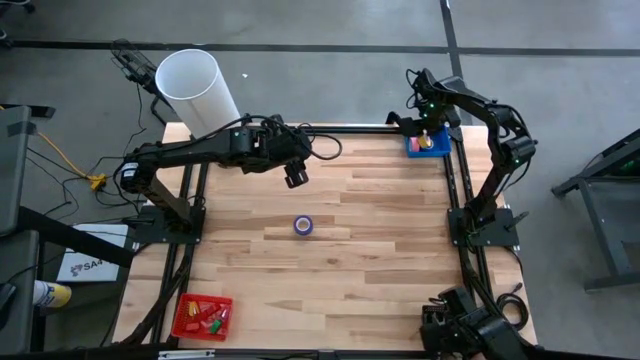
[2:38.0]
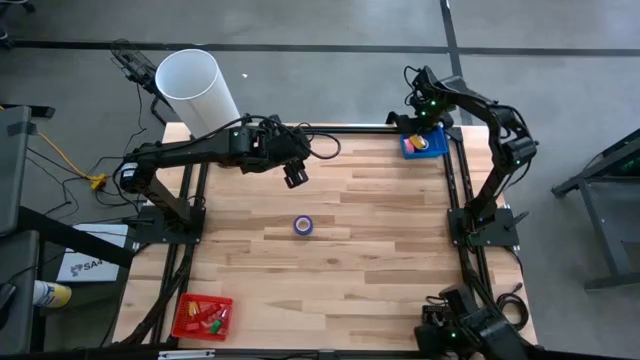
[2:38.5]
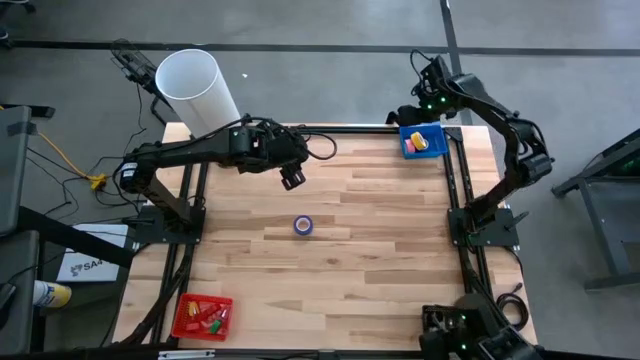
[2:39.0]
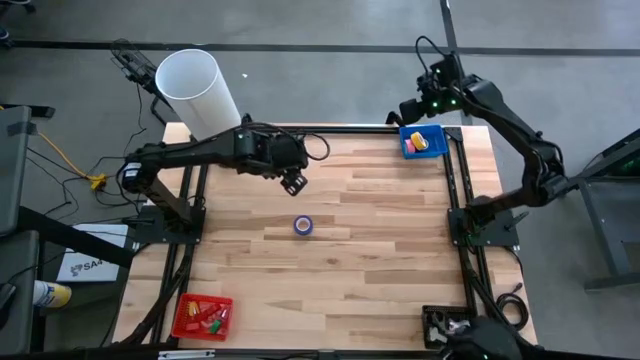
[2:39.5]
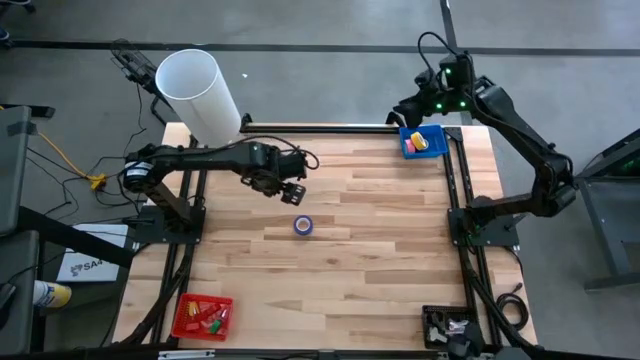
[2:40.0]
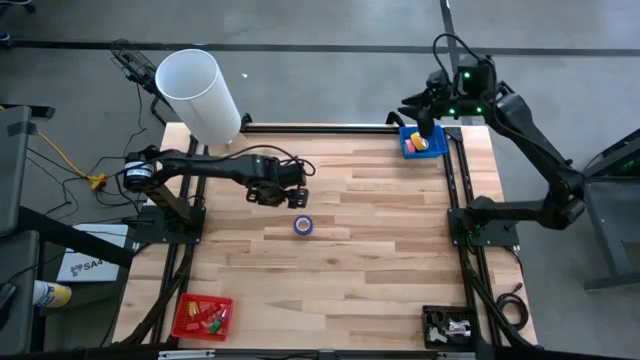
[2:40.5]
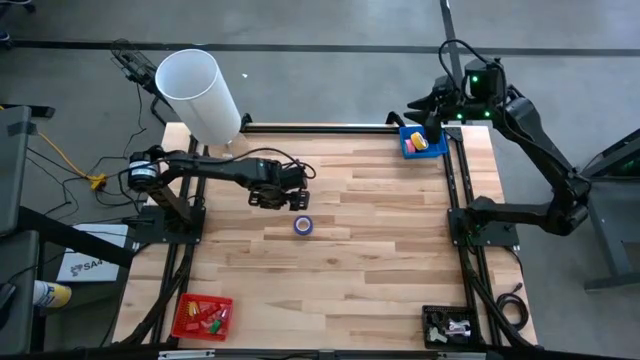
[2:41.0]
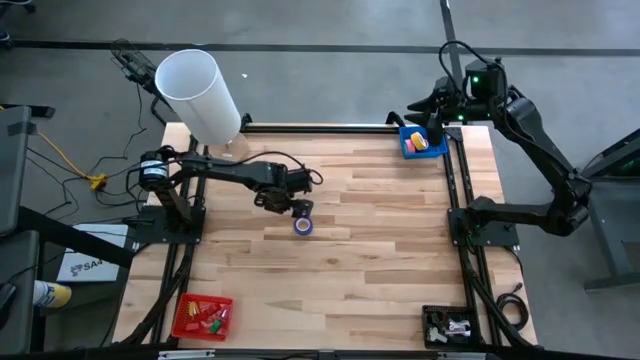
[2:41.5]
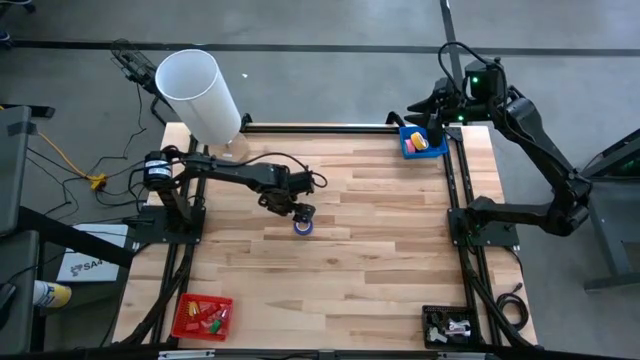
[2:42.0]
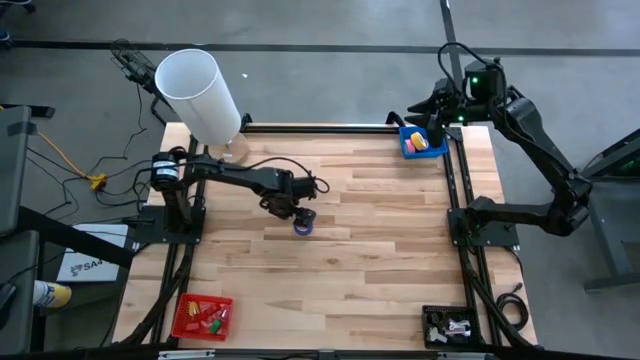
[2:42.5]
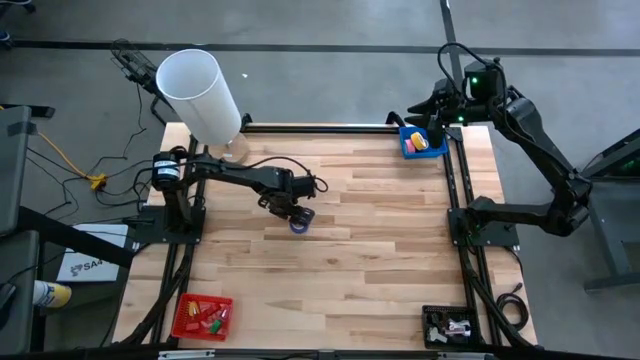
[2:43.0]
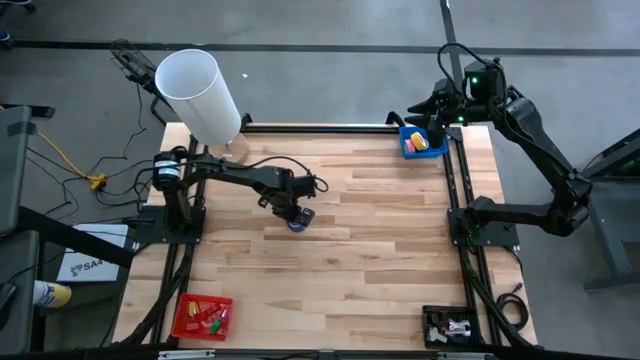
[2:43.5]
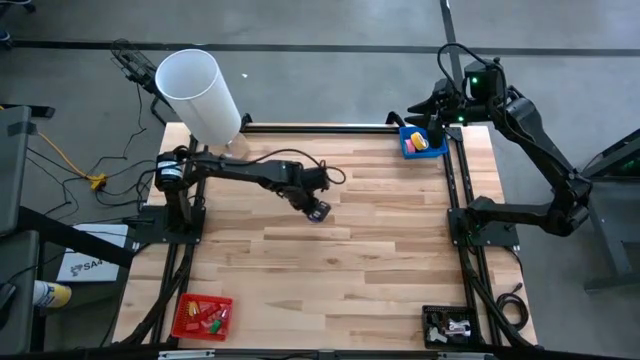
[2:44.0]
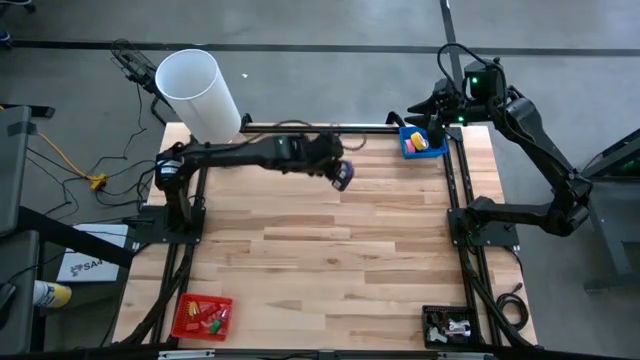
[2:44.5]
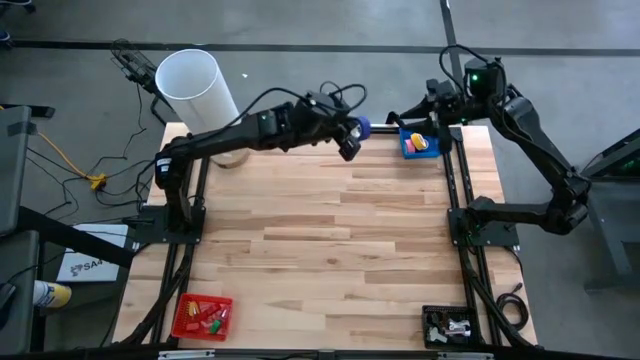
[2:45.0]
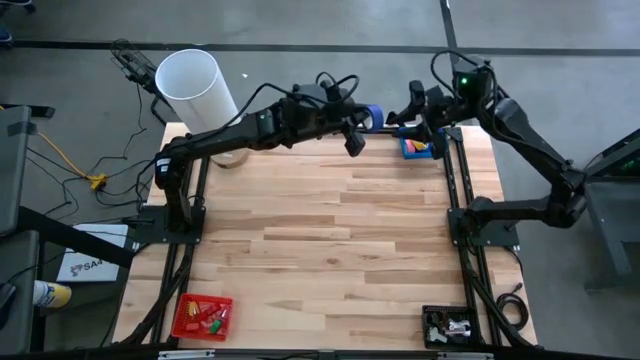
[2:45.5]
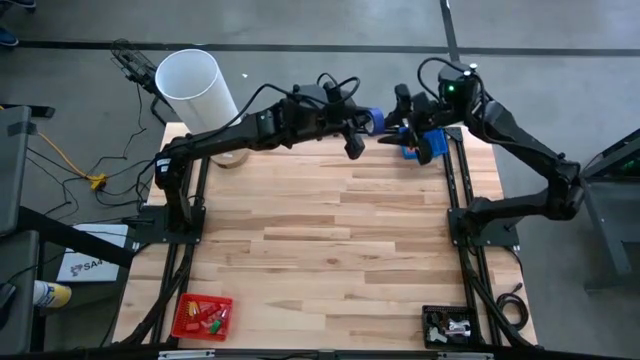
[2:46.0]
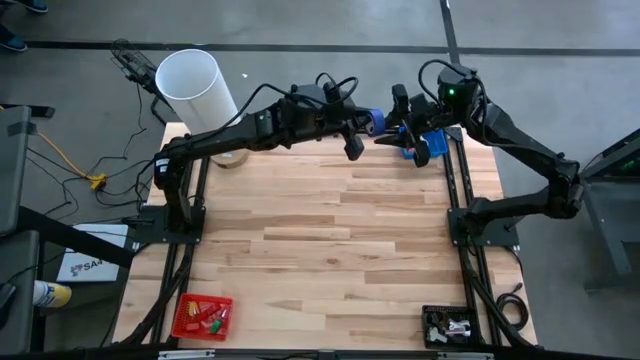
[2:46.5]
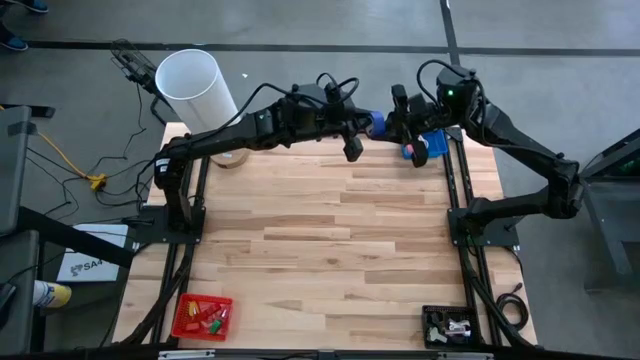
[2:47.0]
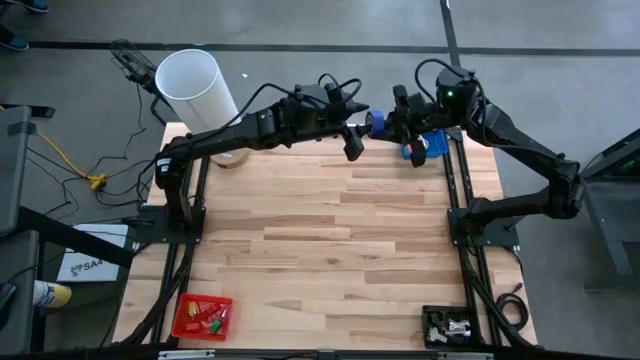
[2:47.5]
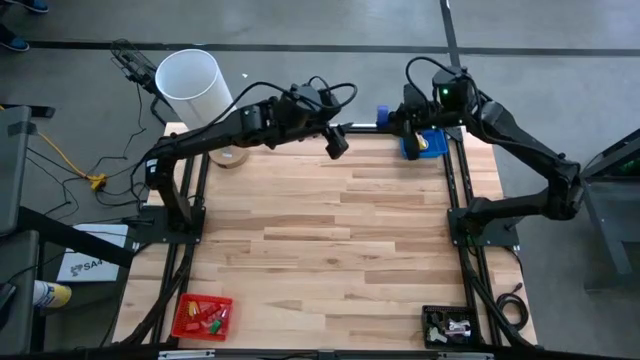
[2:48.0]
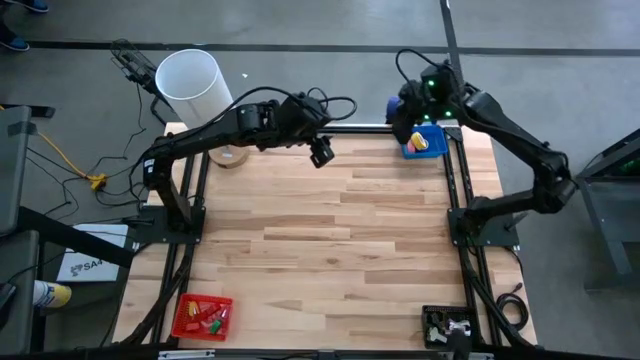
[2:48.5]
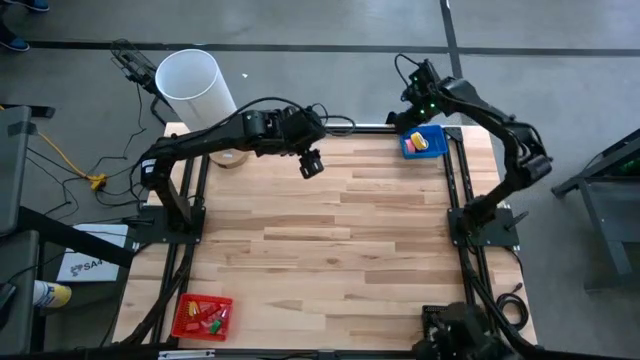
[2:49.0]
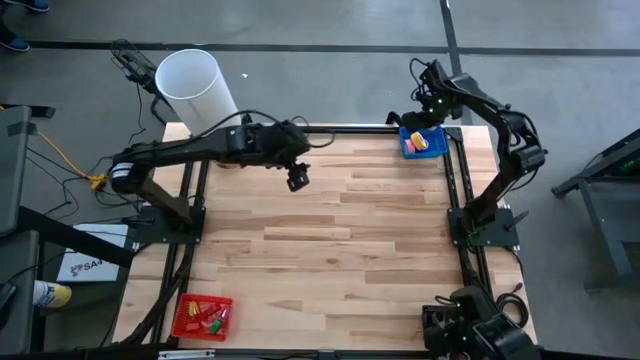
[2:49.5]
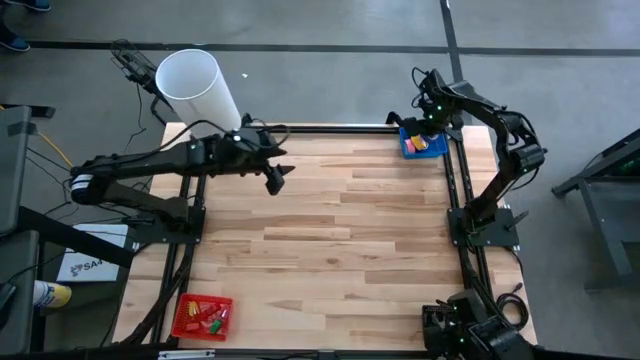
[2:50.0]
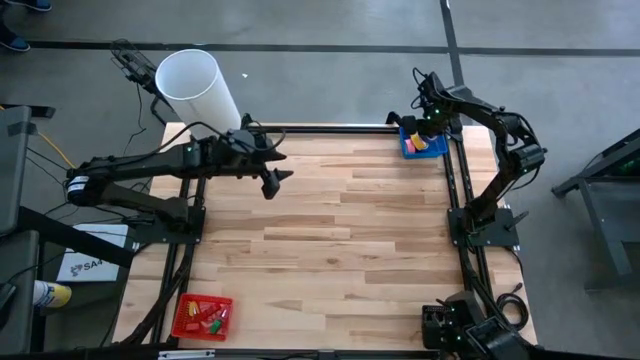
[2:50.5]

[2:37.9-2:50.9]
Task: Pick and place Stapler, Stapler remover, tape
Put the blue tape into the blue bin

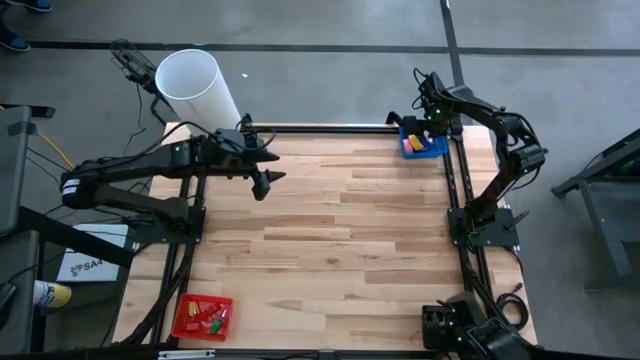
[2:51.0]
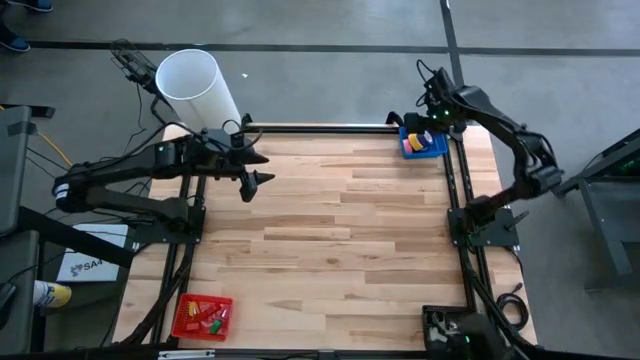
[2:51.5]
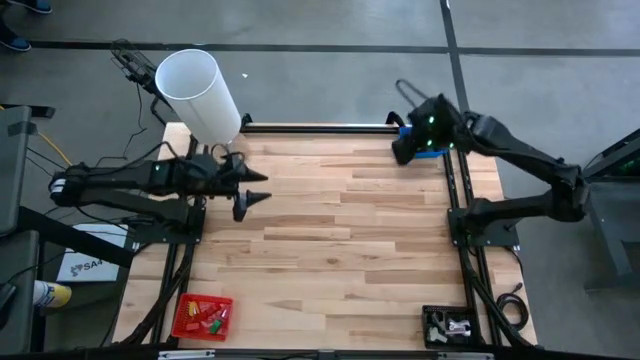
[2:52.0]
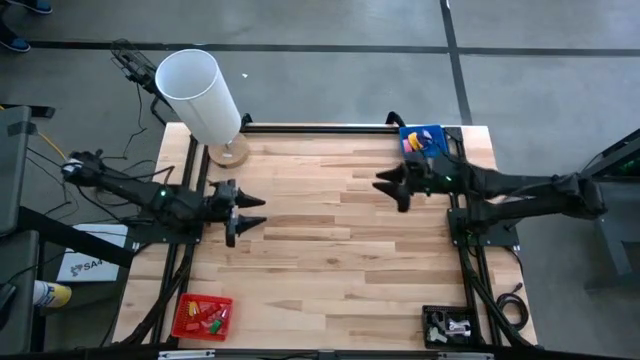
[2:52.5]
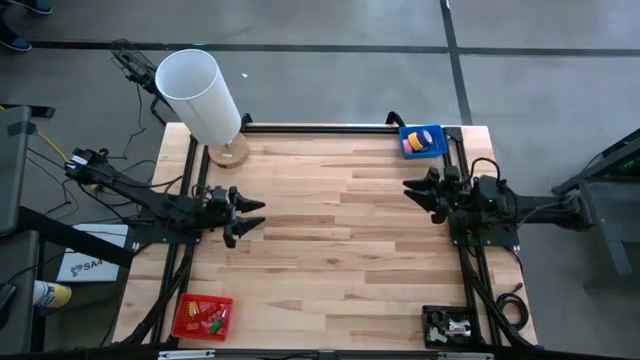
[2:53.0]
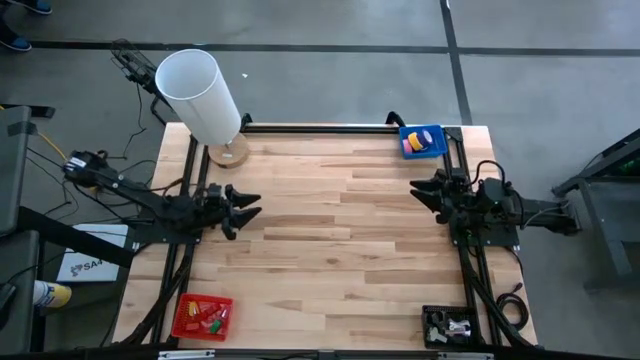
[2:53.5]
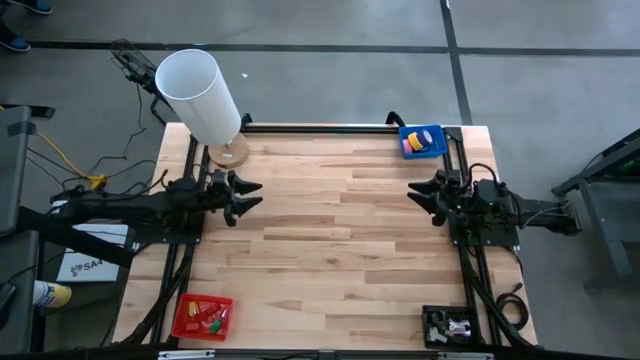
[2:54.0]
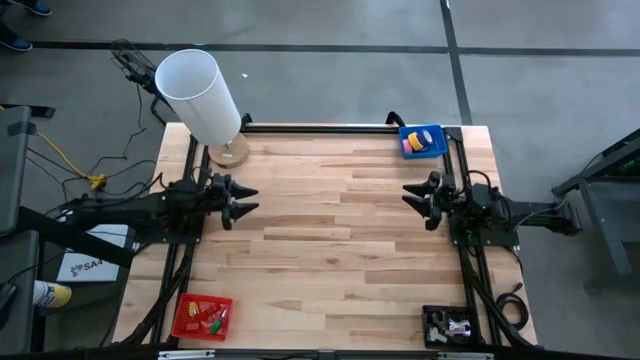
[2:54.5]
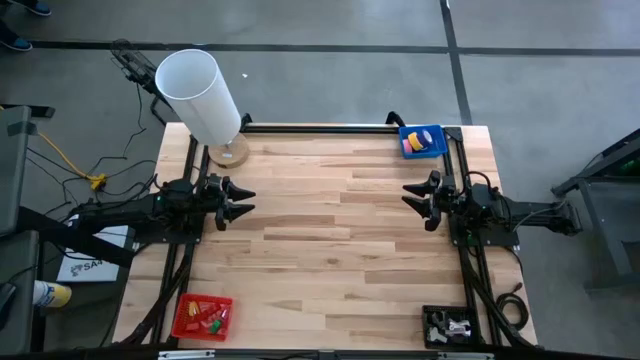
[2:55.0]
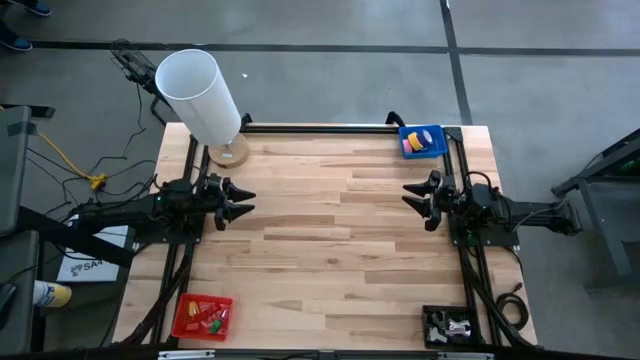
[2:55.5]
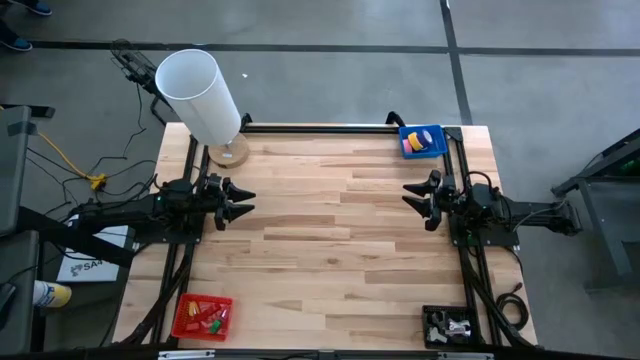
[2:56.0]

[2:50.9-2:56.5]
Return to Home Position

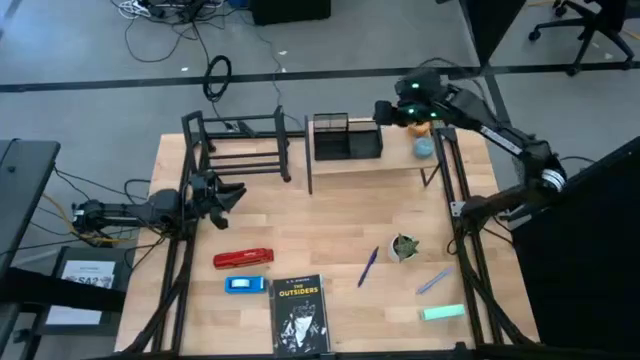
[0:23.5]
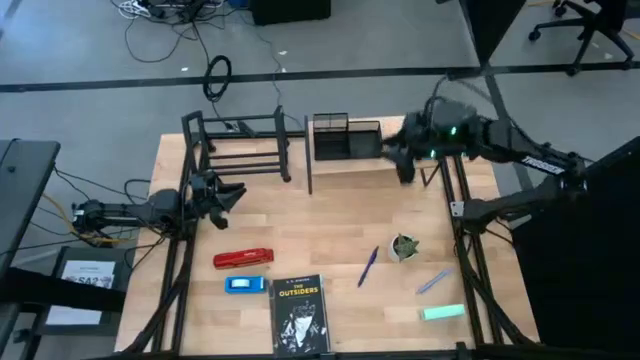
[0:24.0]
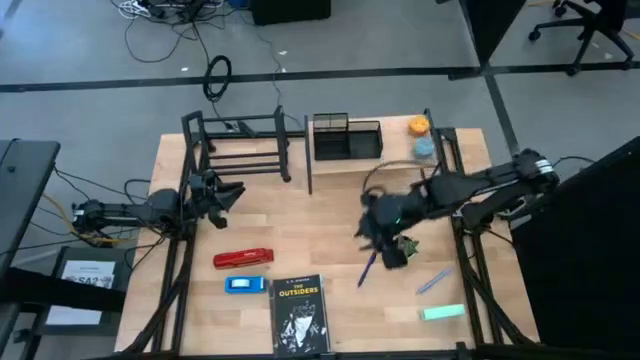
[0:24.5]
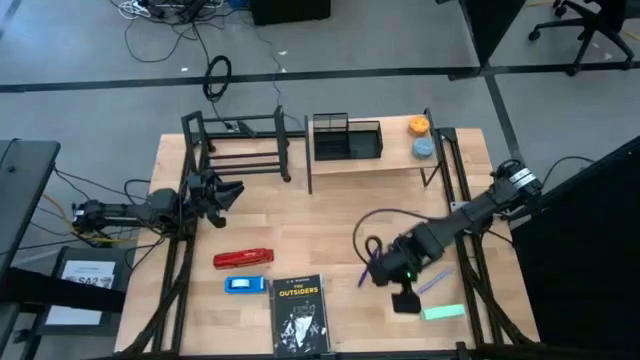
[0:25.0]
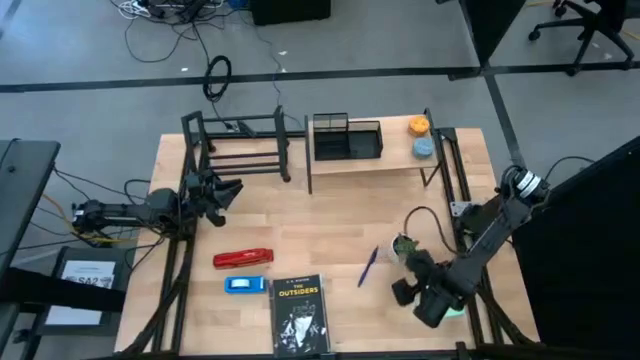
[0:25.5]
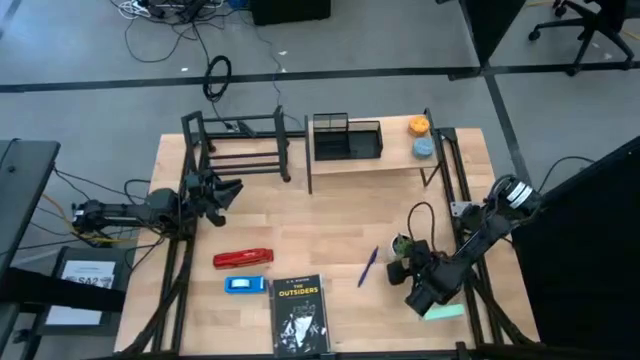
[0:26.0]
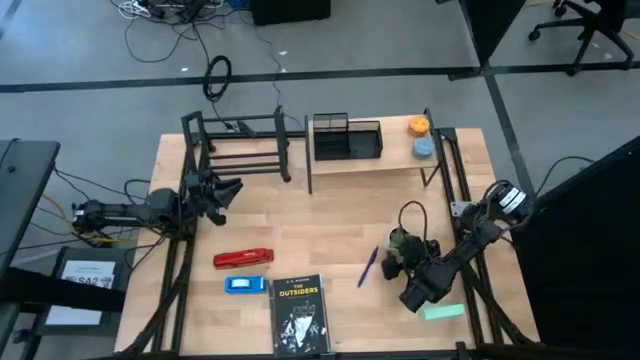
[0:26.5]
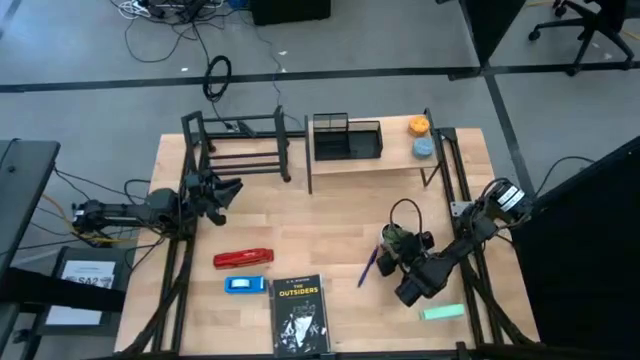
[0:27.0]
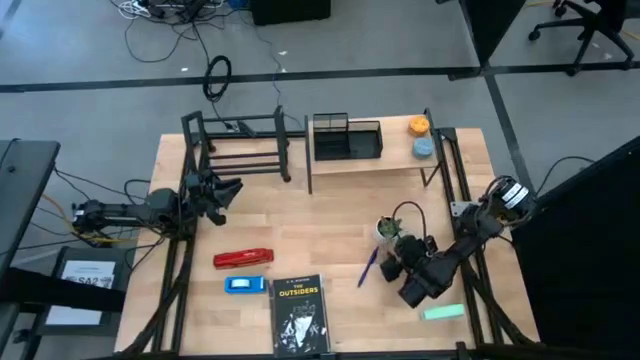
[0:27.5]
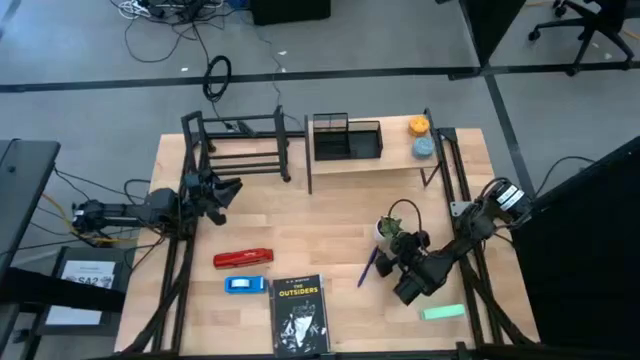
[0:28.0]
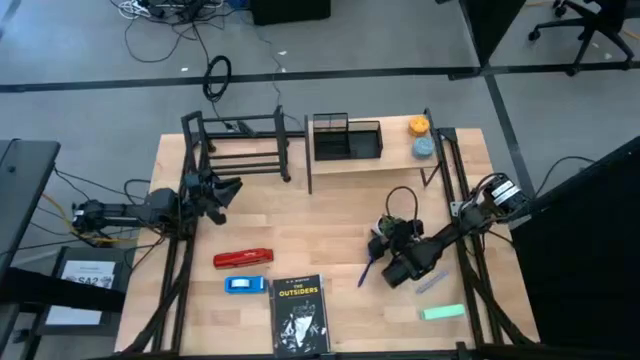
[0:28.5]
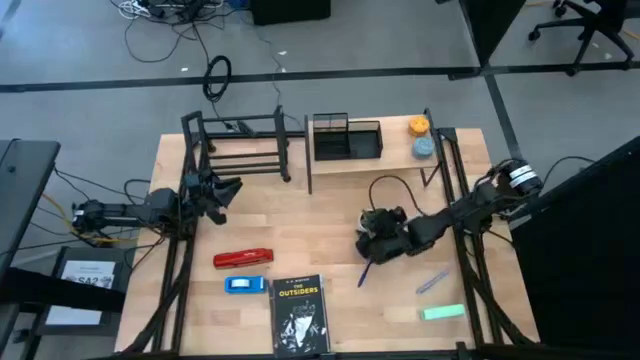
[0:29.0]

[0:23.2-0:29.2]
Task: Stock shelves
Put the white flower pot under the shelf
